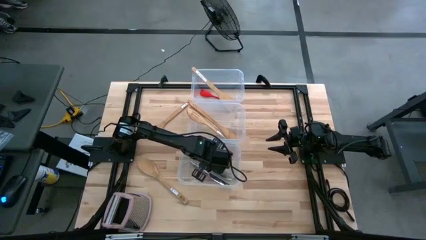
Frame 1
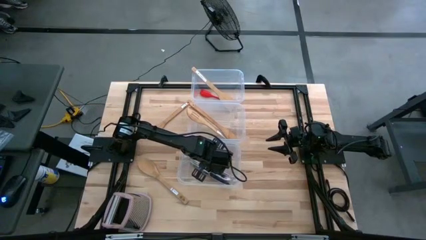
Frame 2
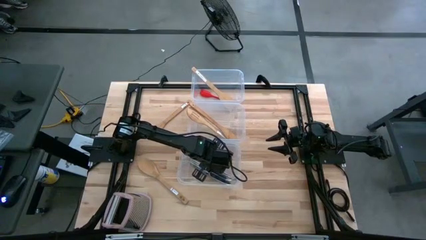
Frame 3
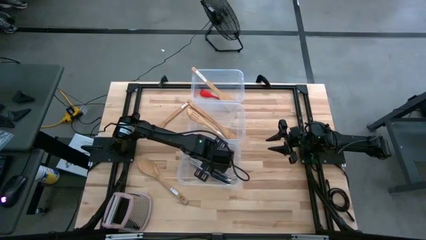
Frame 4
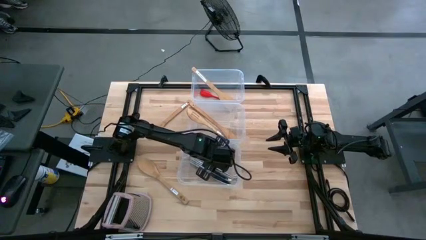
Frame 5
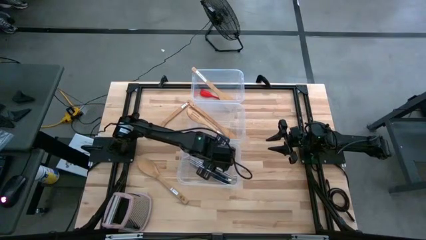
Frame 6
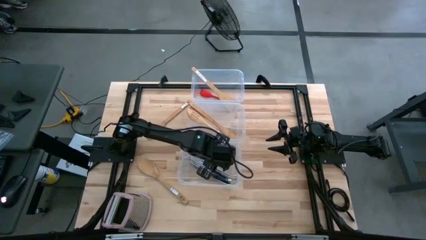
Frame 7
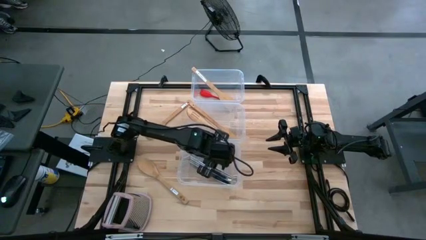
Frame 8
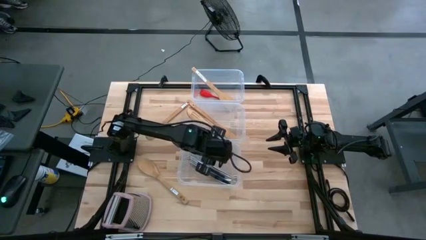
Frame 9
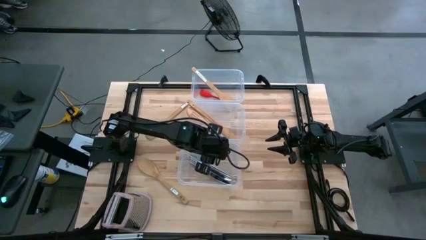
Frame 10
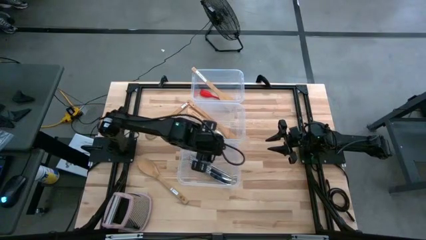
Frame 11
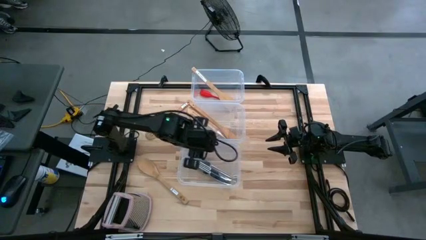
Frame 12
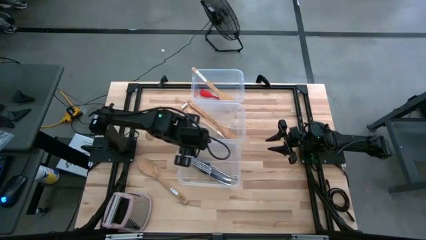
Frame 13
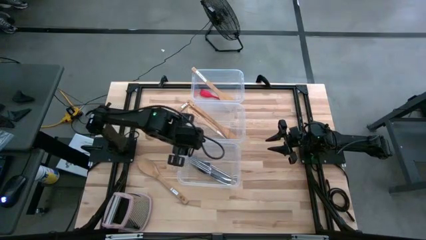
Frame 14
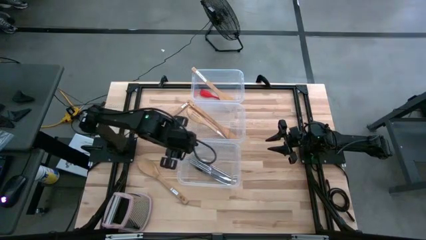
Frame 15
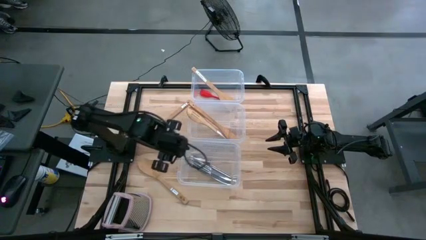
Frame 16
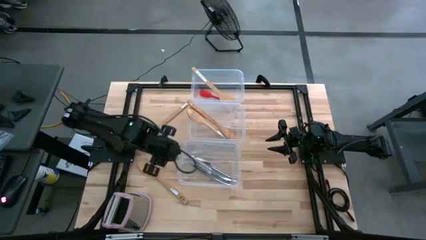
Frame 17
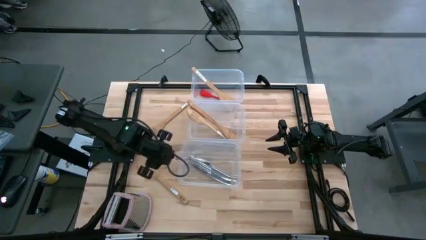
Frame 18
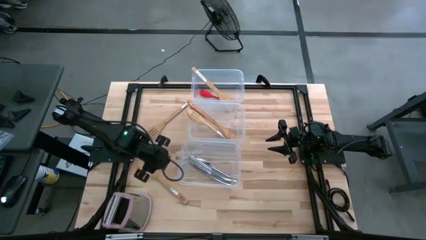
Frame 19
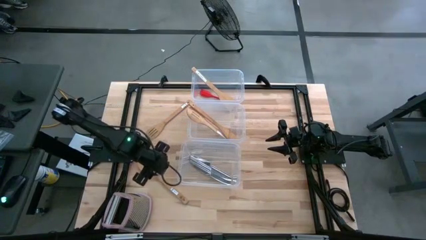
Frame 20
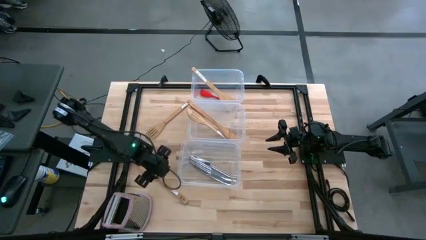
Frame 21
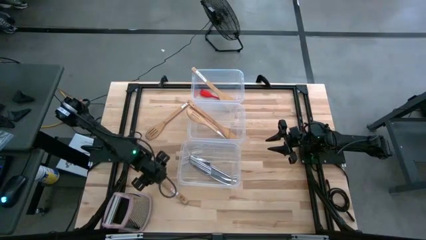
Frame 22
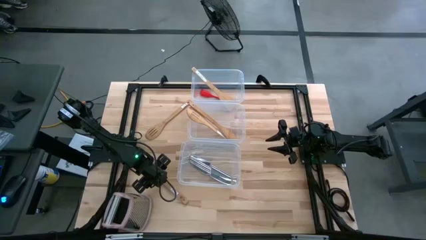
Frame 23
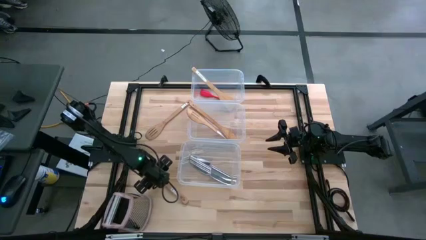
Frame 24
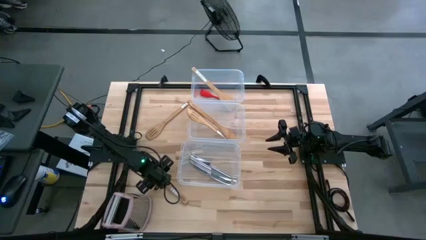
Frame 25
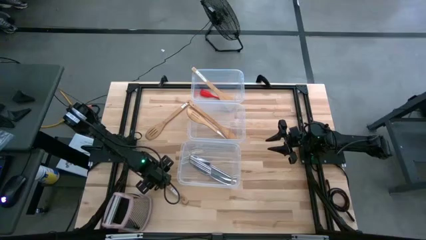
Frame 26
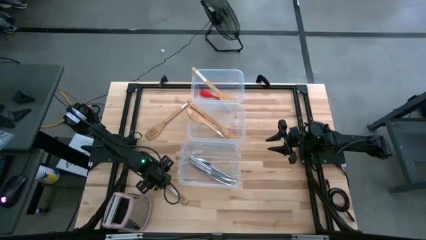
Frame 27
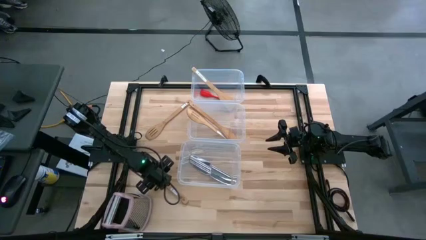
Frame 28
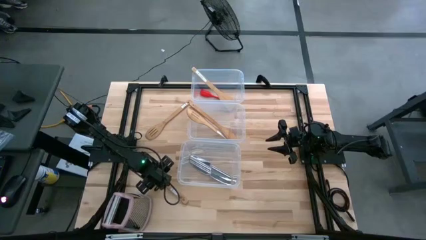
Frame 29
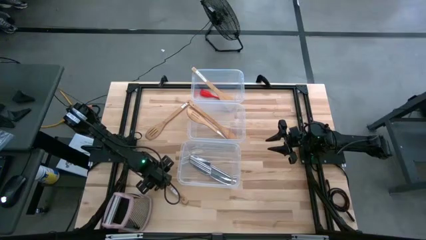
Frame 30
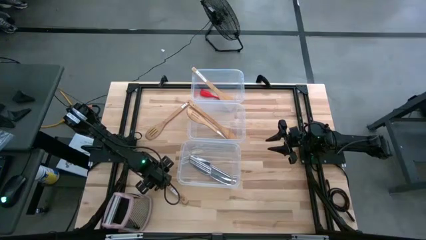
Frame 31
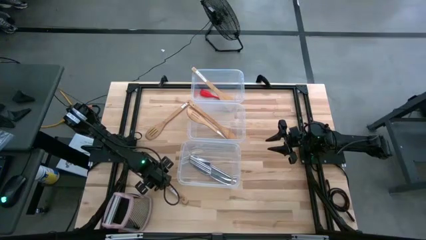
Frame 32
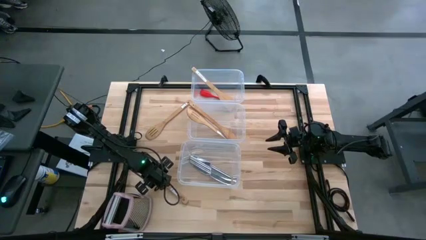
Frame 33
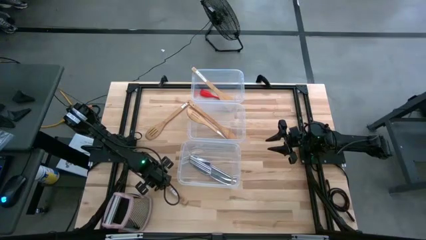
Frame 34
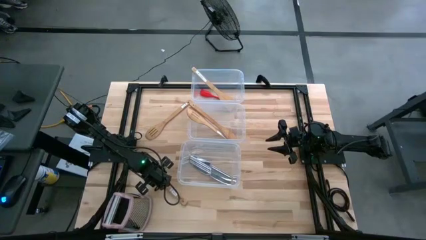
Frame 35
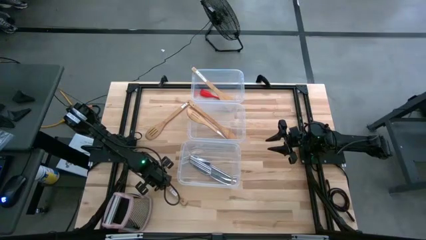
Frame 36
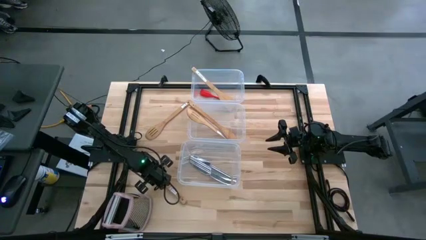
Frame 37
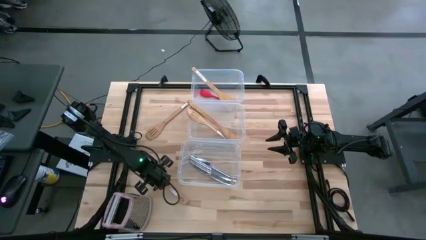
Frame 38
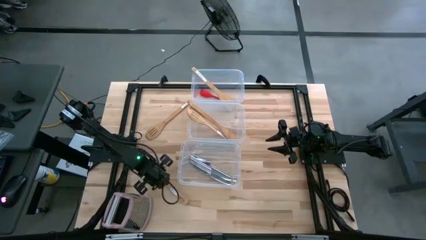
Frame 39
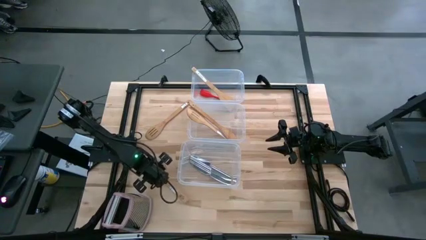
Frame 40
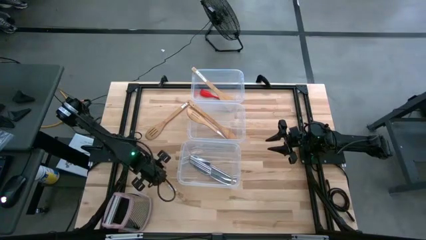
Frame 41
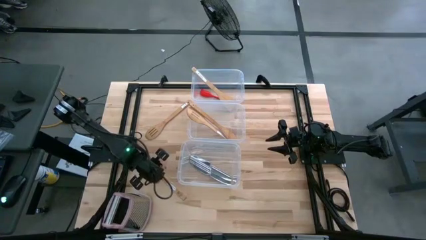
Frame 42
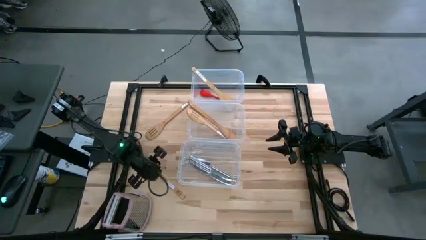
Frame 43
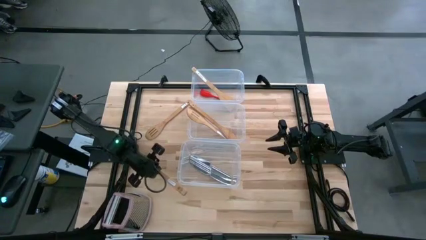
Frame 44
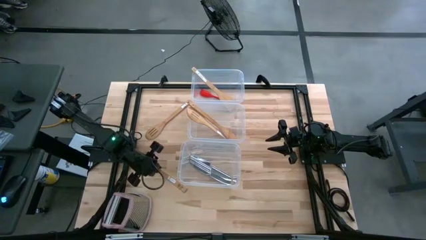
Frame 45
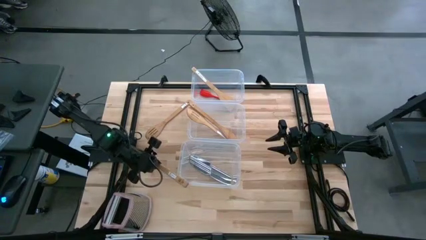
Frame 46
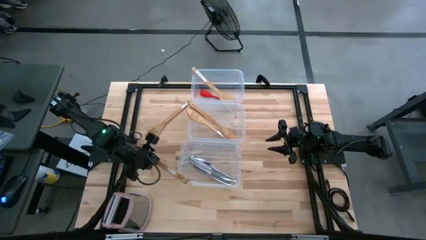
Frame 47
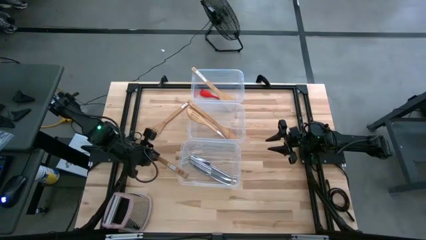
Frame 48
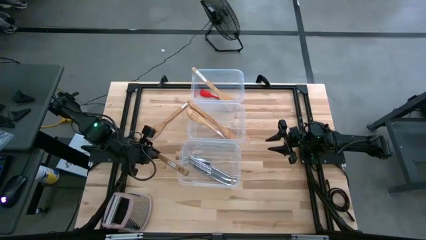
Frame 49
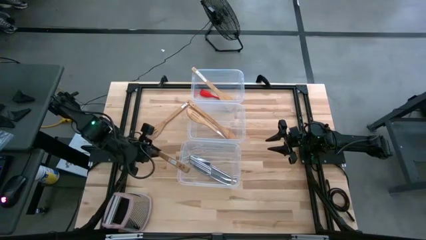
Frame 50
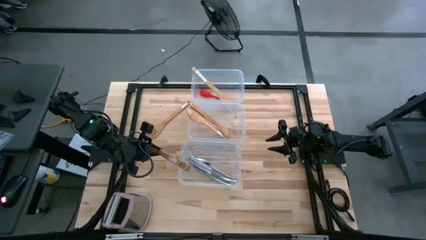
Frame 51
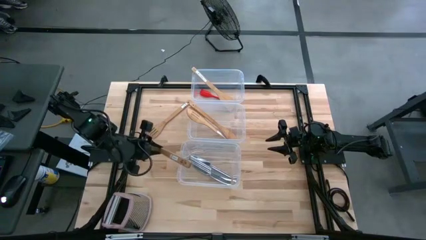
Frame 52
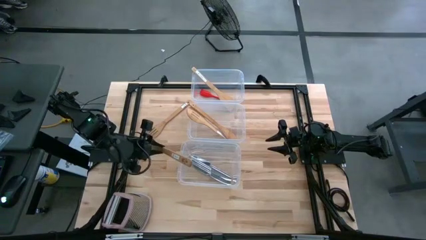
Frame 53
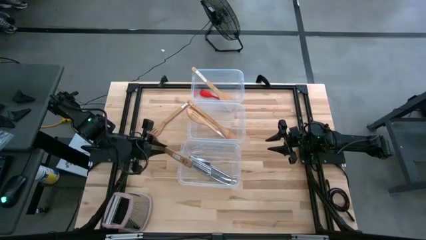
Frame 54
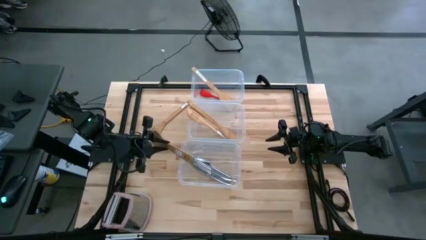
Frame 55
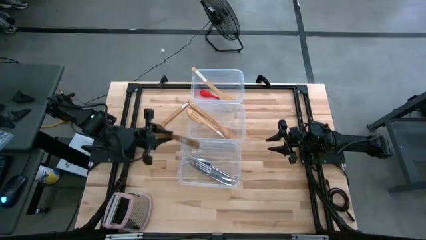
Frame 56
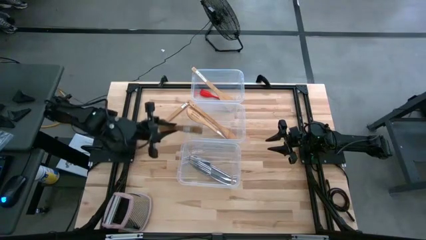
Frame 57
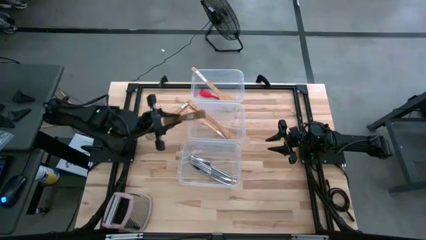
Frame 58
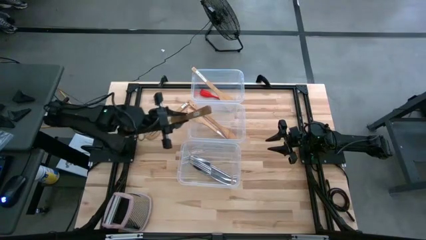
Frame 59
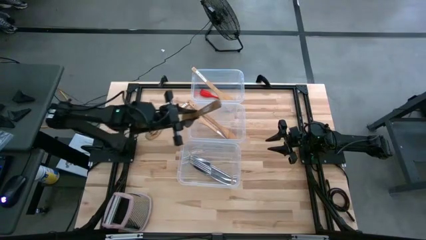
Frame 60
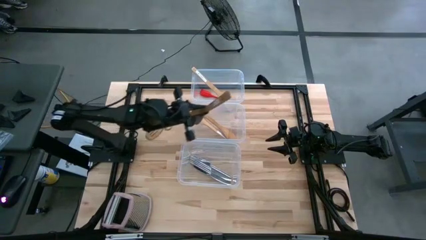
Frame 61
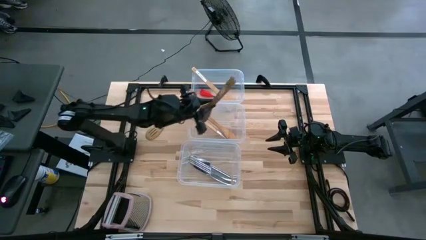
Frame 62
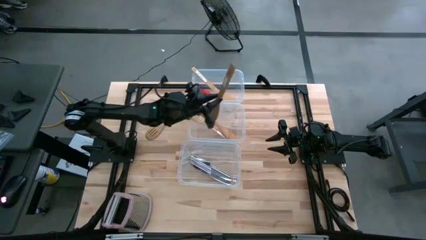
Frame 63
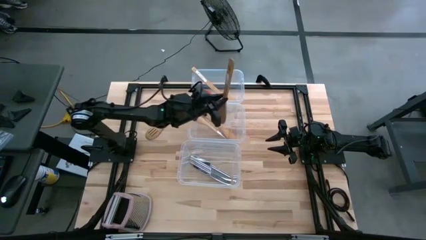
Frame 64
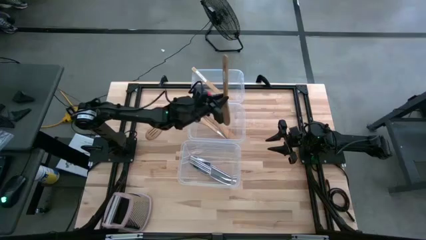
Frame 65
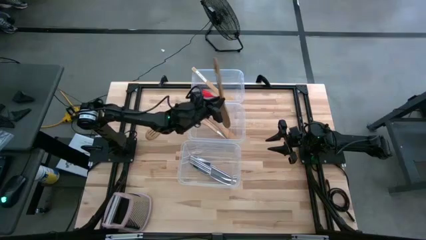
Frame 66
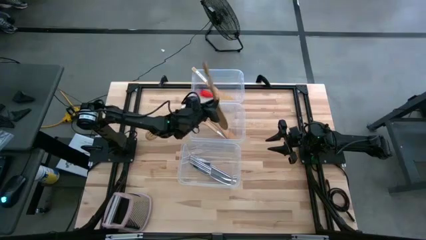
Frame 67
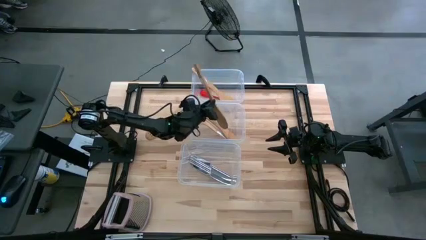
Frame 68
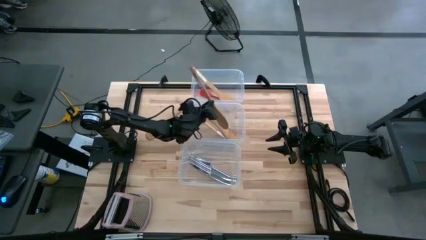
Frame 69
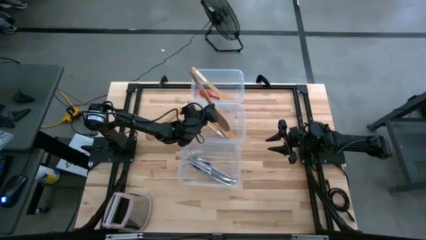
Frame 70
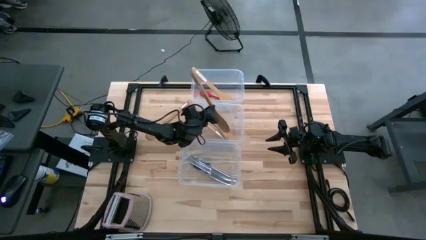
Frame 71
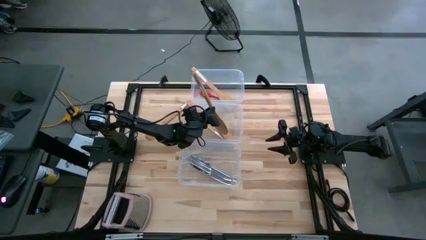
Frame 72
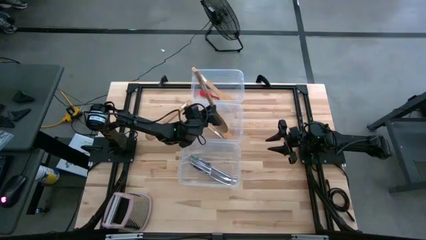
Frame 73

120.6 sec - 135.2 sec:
Task: Pick & Place Kitchen Items
Put the brown spoon into the middle transparent bin
